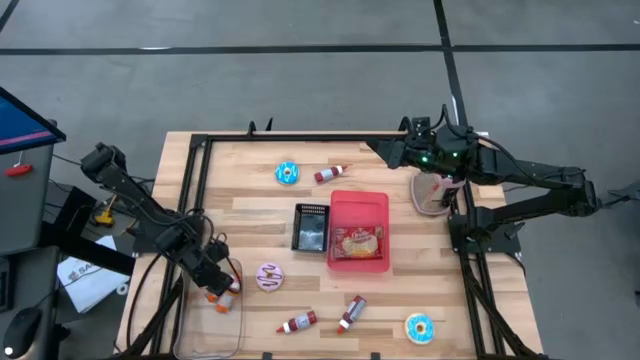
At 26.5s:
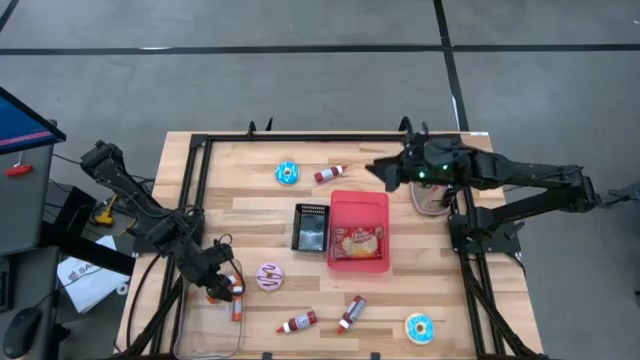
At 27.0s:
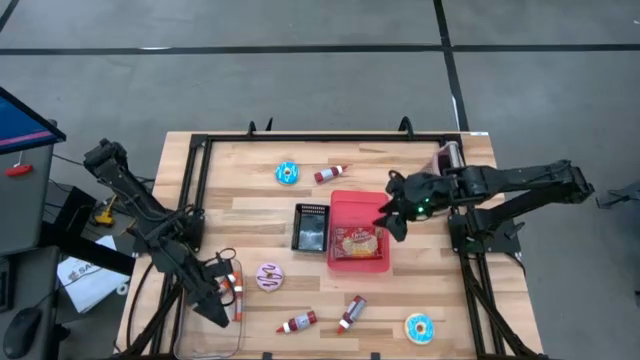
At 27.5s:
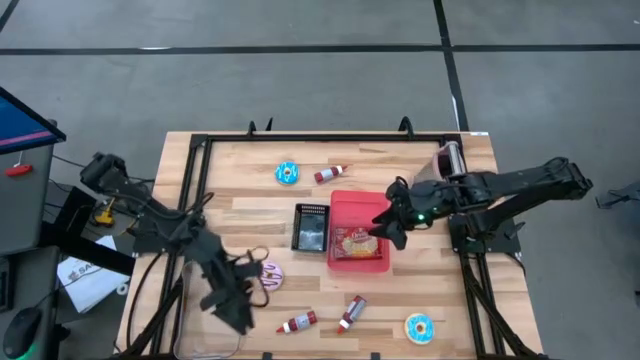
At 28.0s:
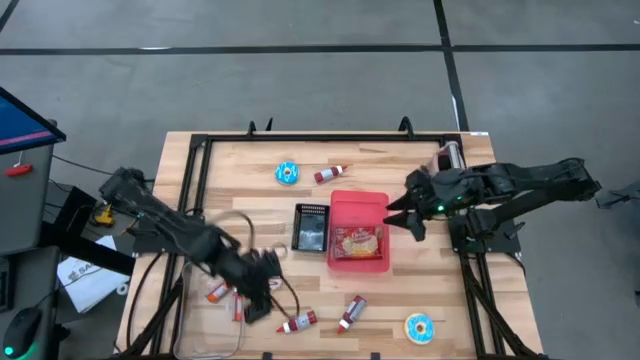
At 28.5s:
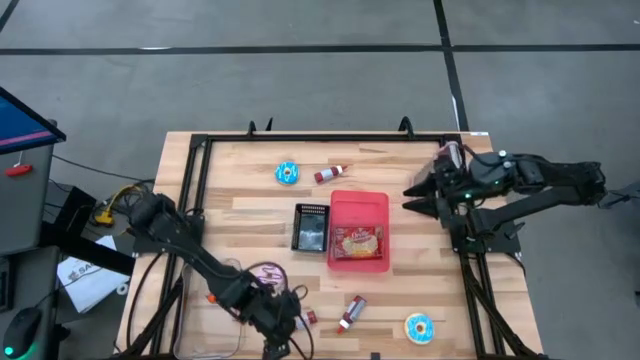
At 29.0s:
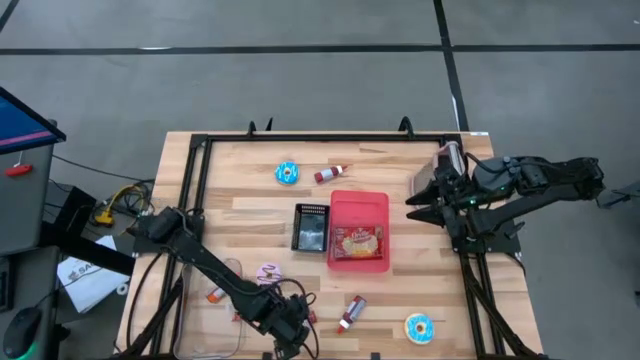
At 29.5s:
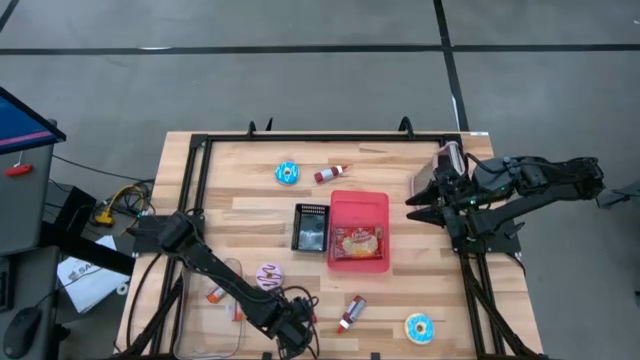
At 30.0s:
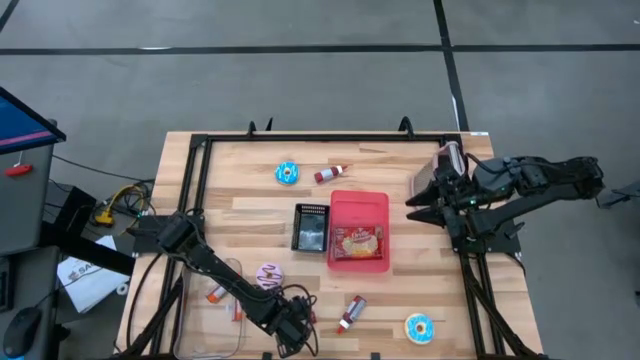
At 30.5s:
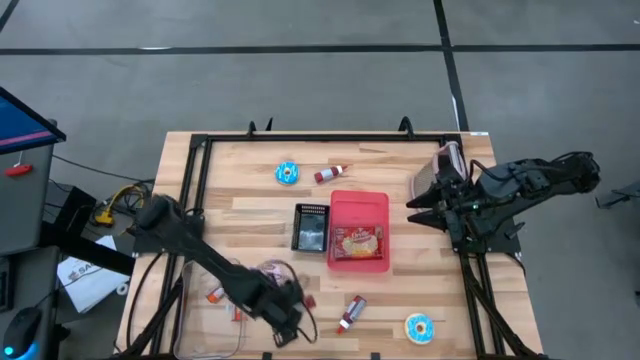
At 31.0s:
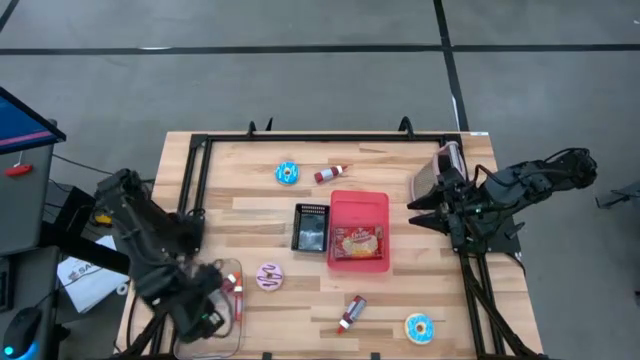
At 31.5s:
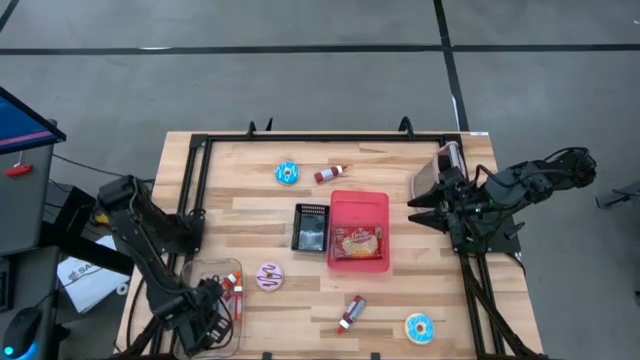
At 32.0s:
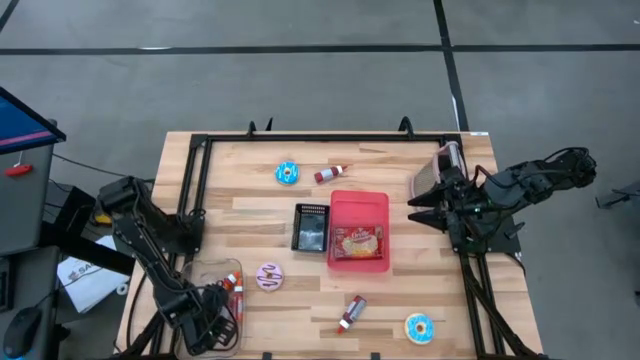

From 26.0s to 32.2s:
Put the bottom left red food coloring bottle into the transparent bin

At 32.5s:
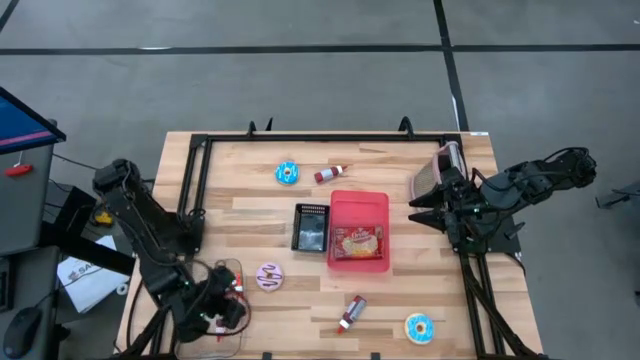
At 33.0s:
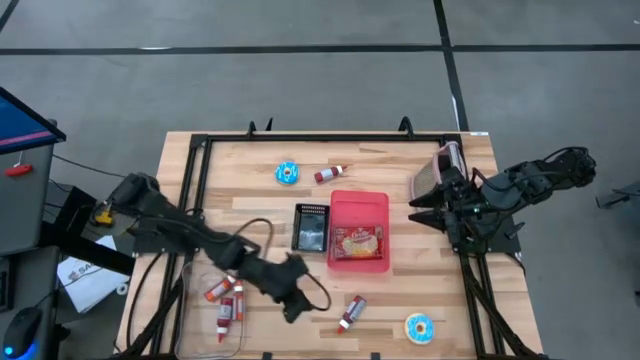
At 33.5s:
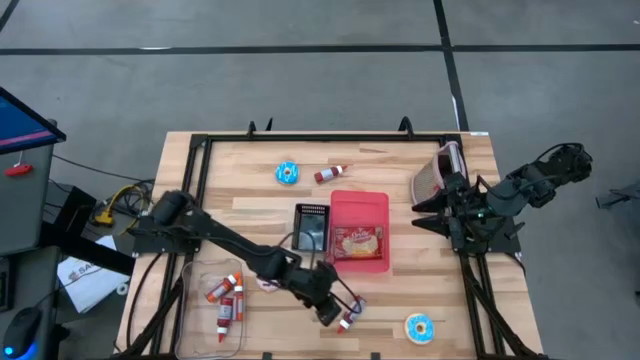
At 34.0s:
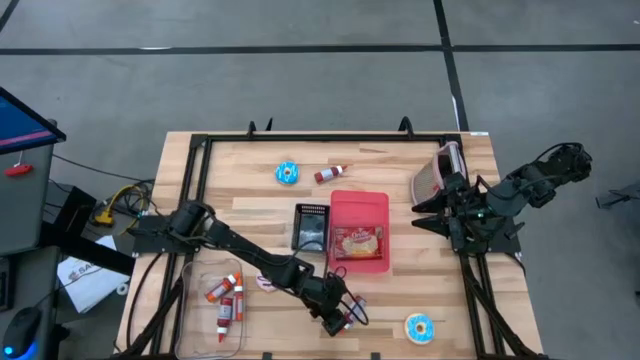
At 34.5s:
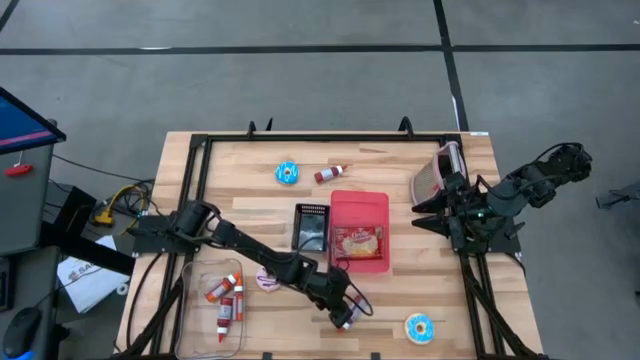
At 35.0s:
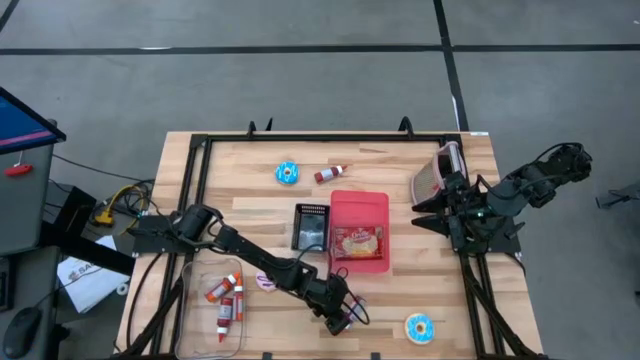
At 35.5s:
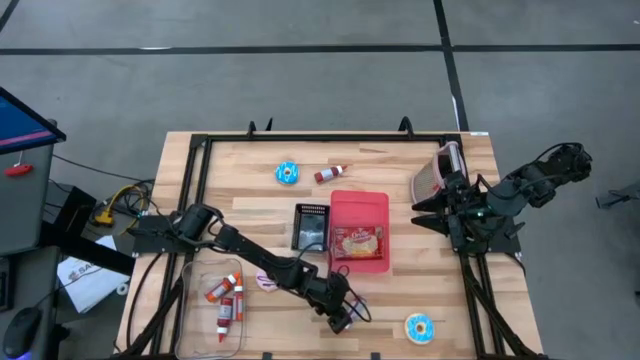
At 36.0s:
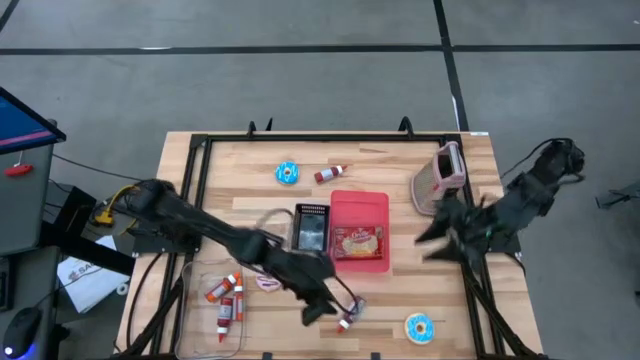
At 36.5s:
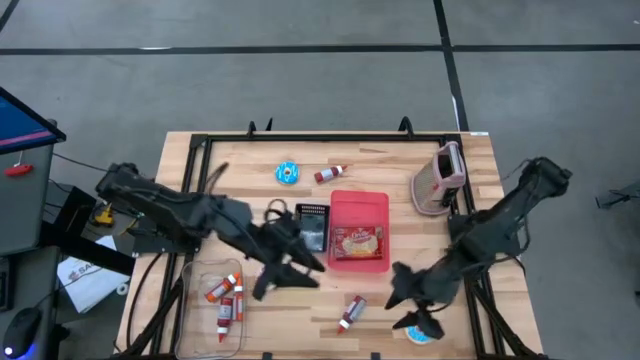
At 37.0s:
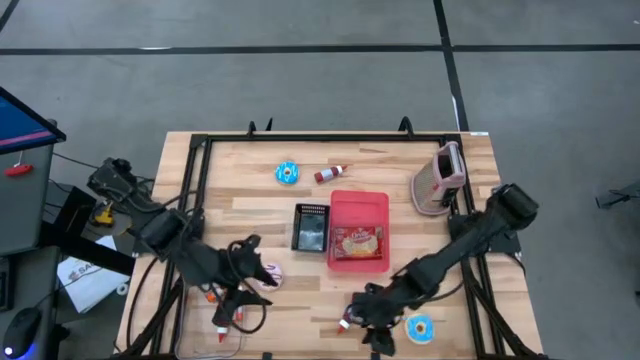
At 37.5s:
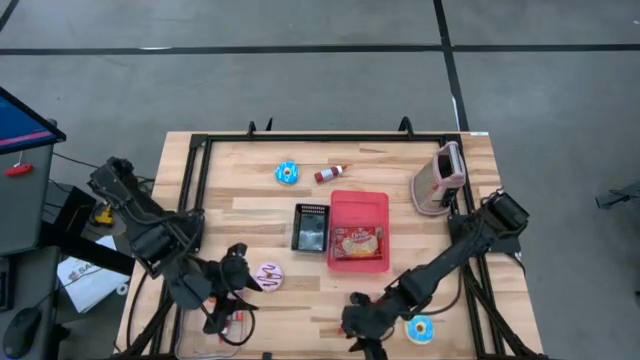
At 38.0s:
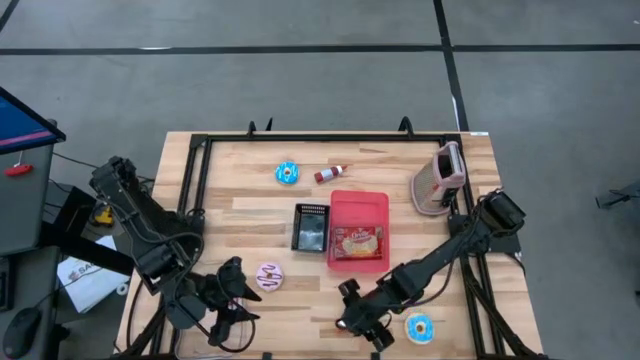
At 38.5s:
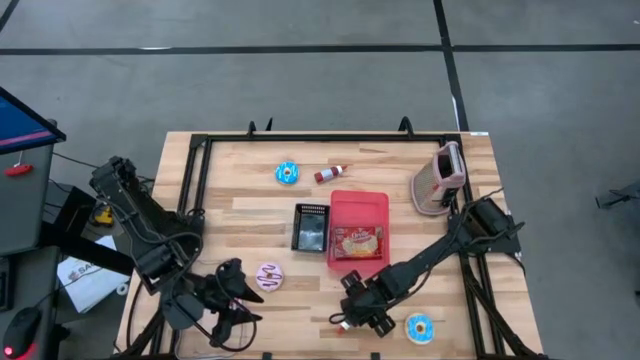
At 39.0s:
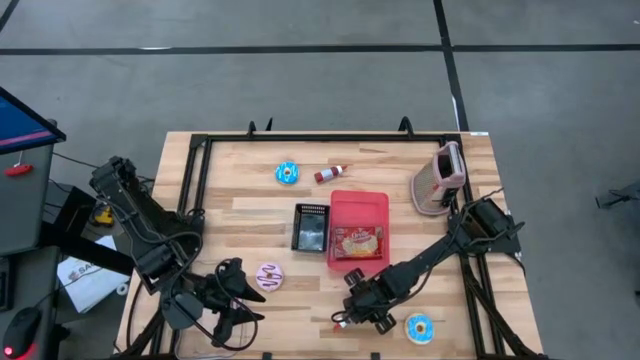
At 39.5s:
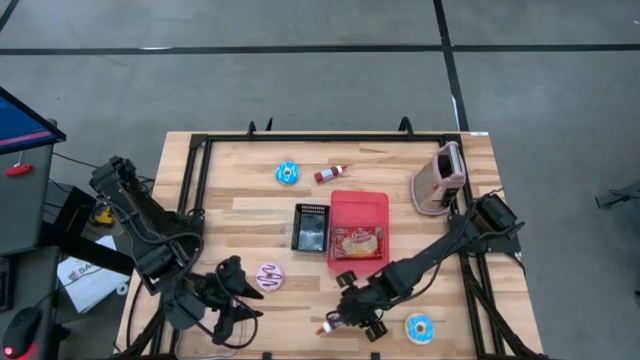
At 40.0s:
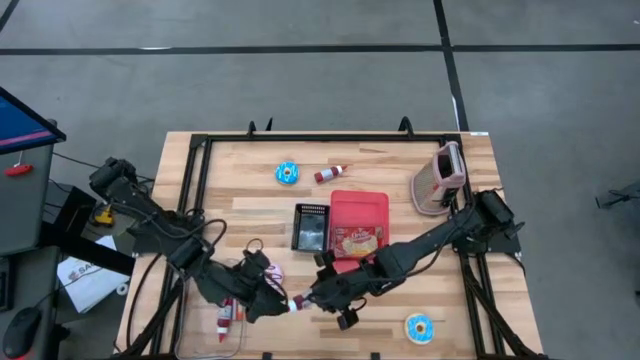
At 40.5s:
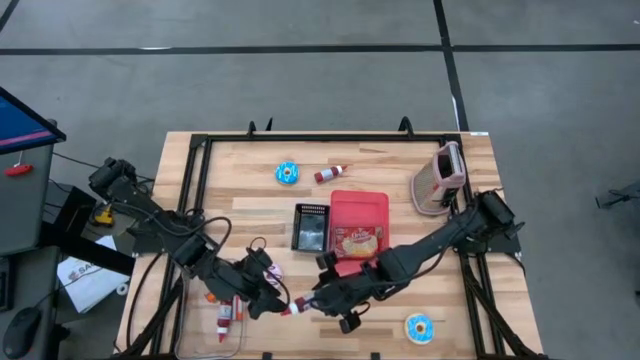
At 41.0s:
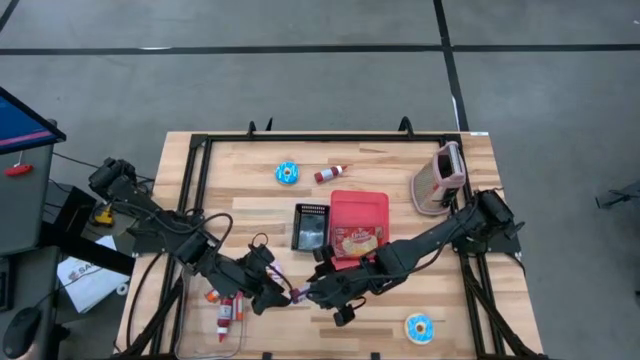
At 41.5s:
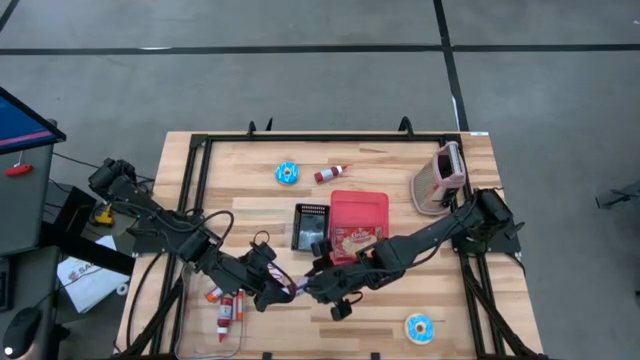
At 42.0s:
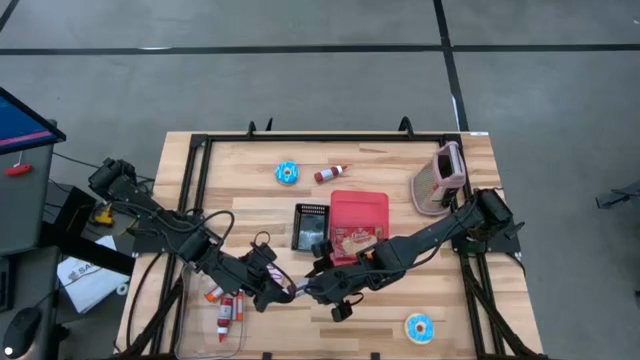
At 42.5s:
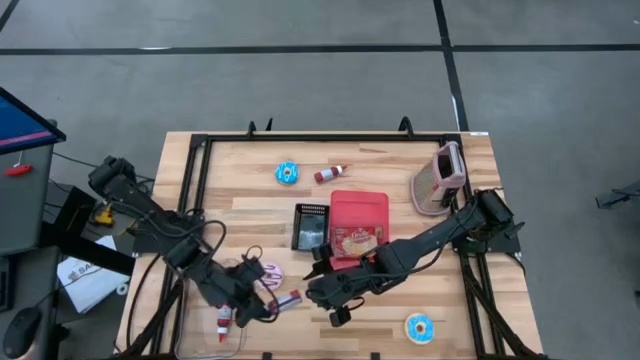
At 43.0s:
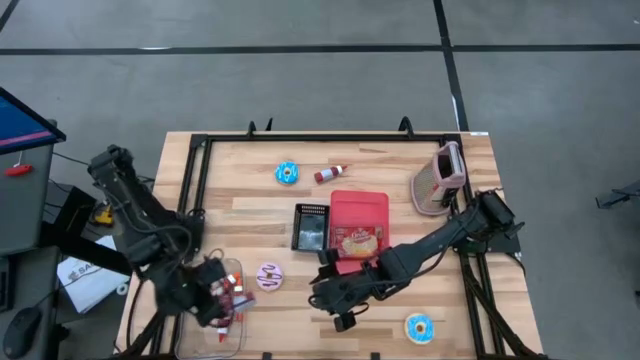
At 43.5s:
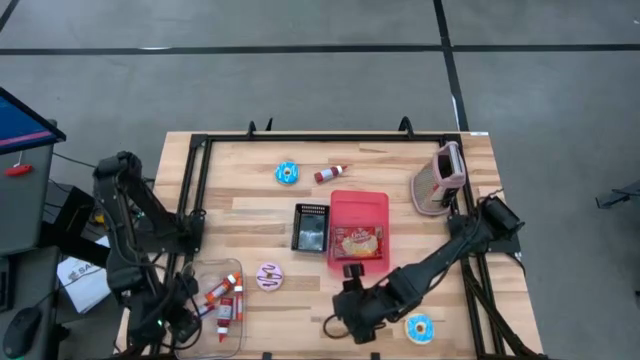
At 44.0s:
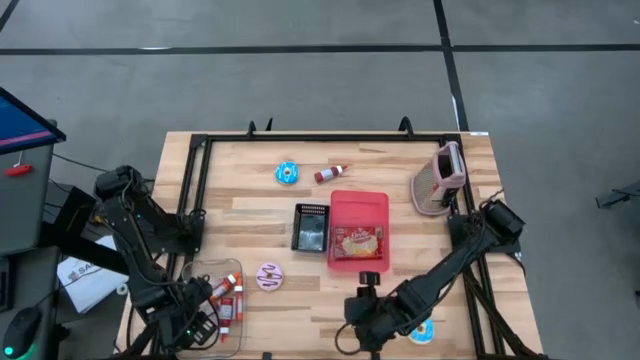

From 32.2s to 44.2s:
Put the bottom red food coloring bottle into the transparent bin
